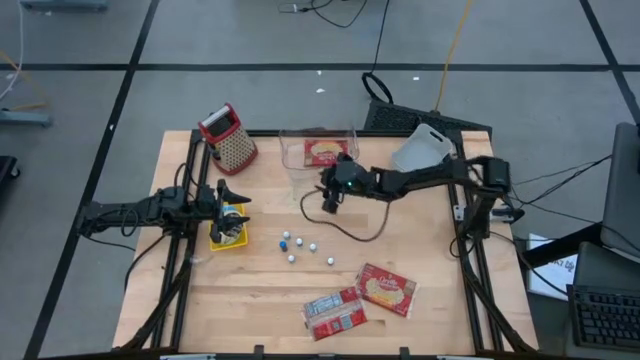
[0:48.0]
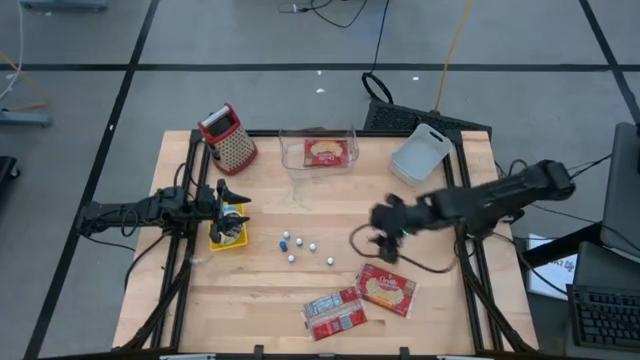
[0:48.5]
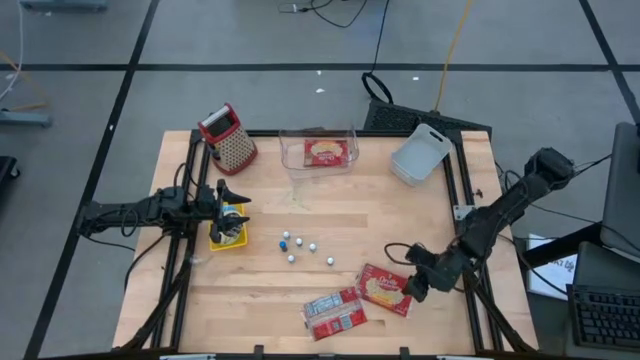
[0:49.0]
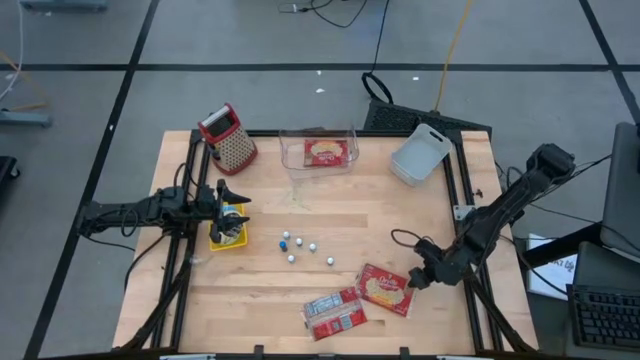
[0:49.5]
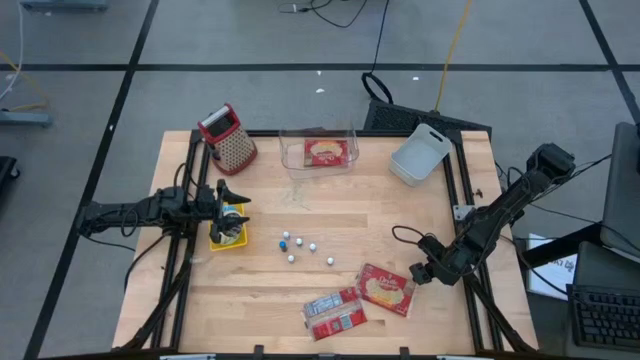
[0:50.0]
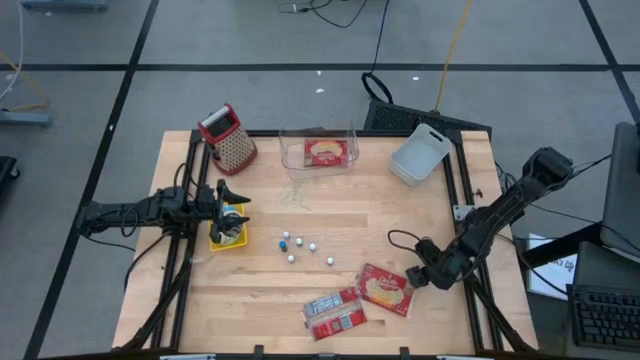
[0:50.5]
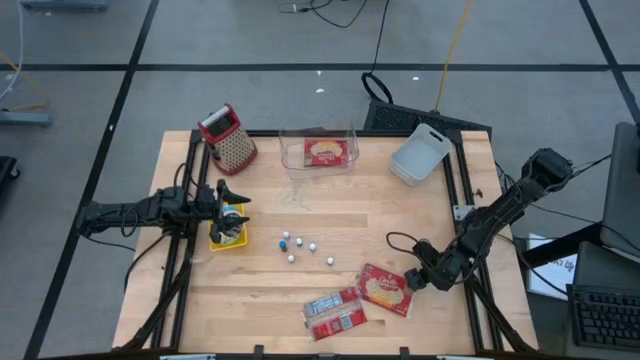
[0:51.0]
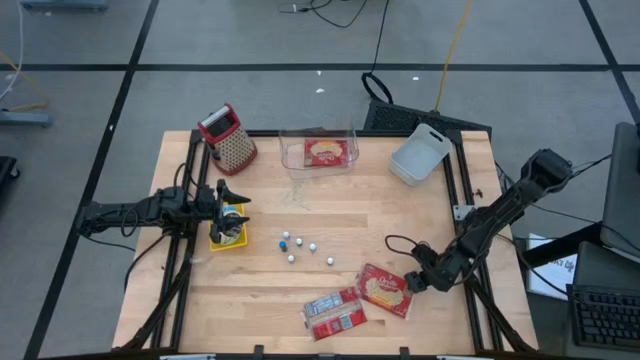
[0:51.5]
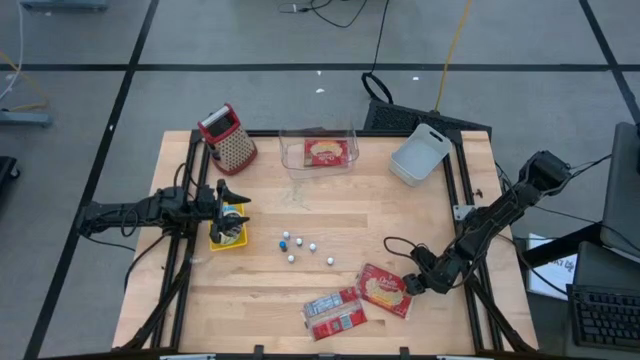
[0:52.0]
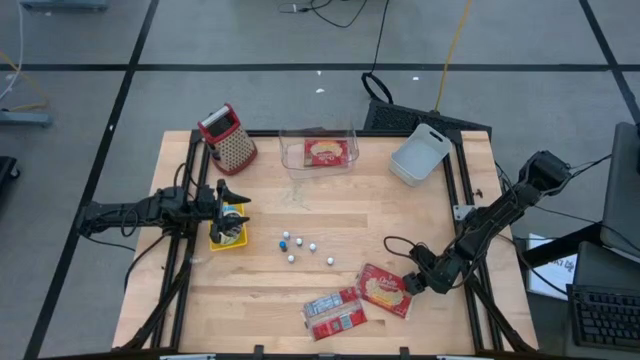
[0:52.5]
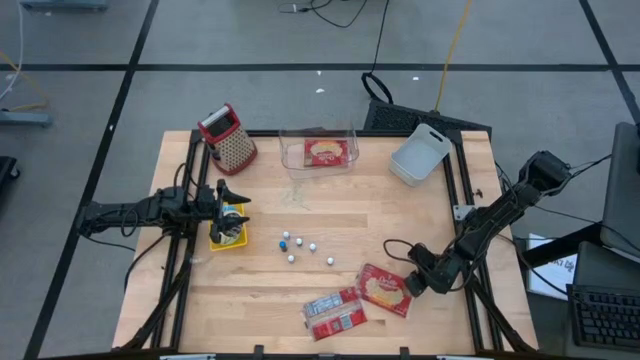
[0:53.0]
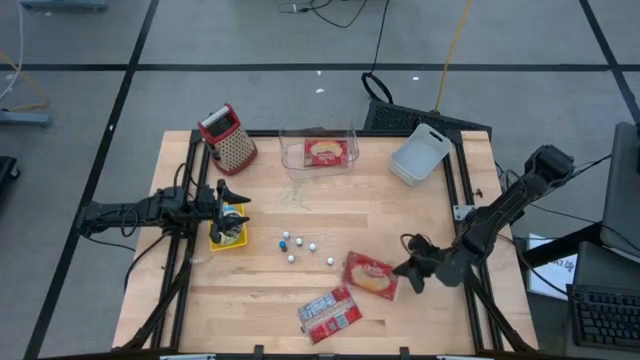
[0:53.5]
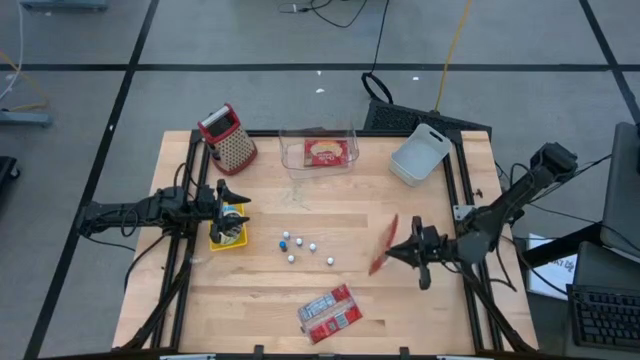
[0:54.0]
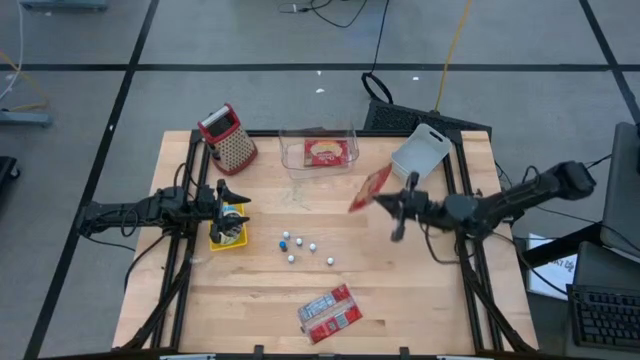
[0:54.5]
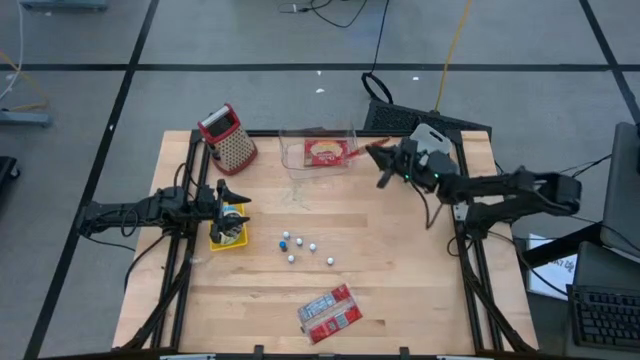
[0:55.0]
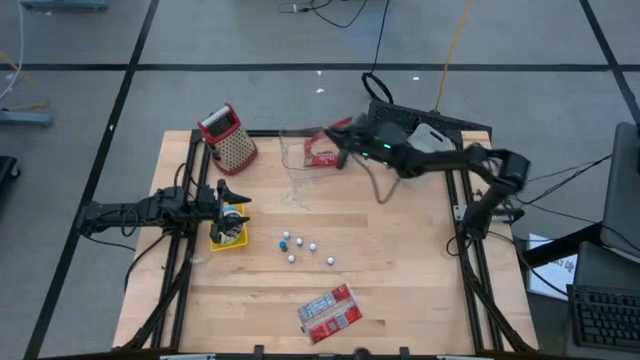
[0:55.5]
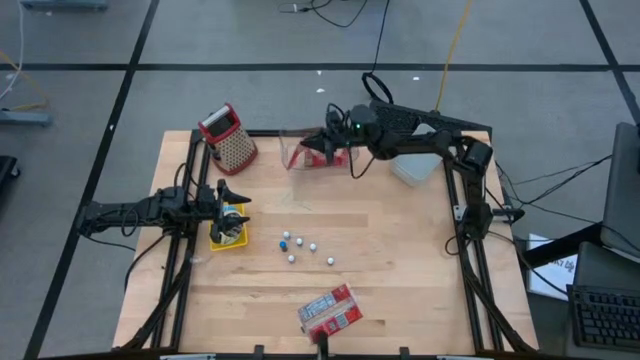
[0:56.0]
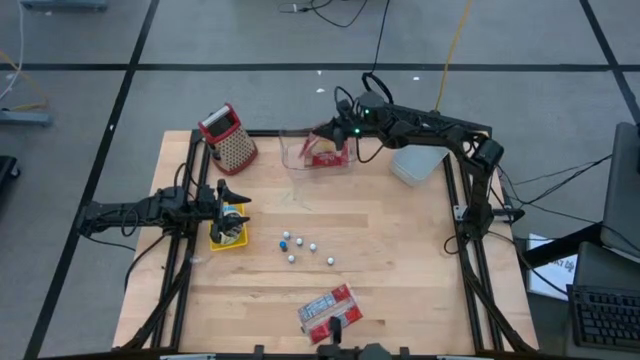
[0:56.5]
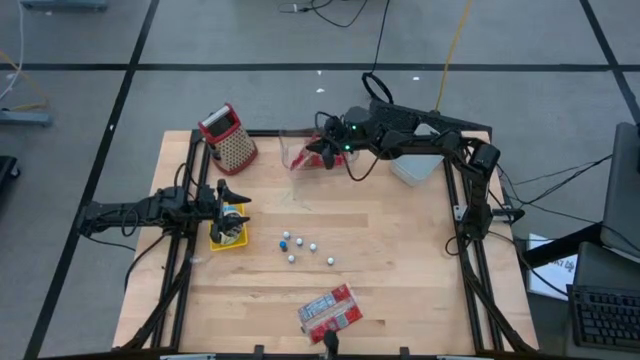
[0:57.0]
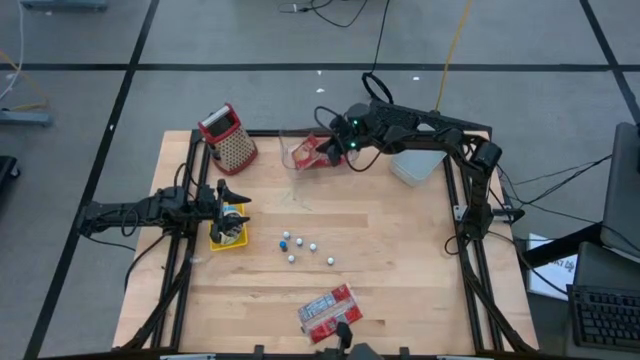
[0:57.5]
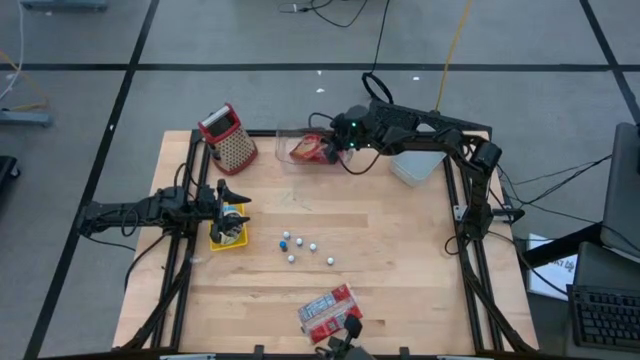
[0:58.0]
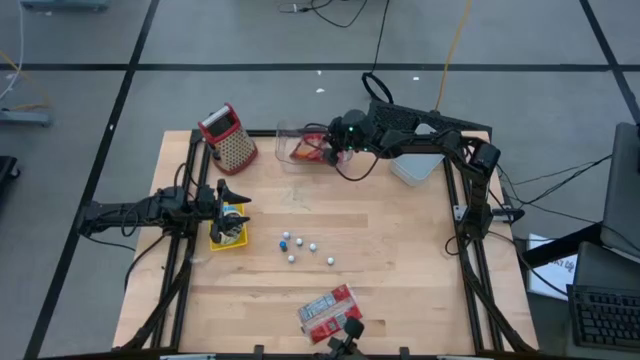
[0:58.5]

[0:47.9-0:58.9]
Put the right popcorn bag into the transparent bin

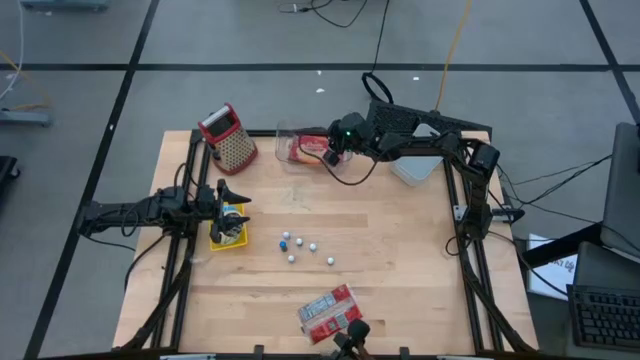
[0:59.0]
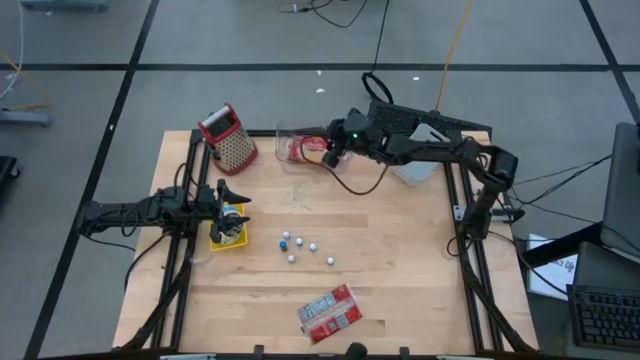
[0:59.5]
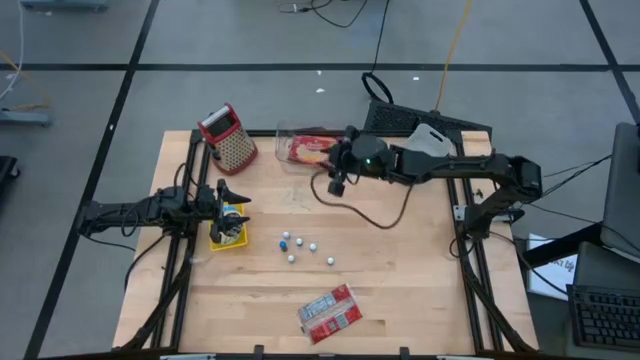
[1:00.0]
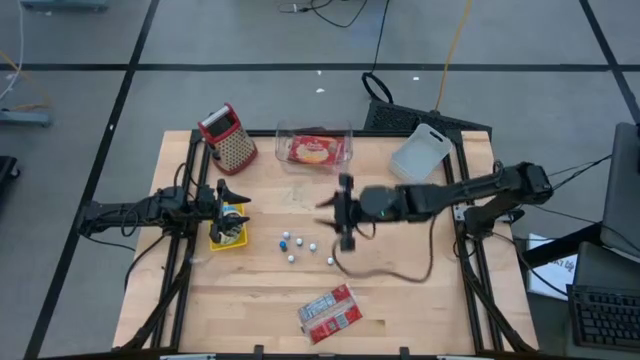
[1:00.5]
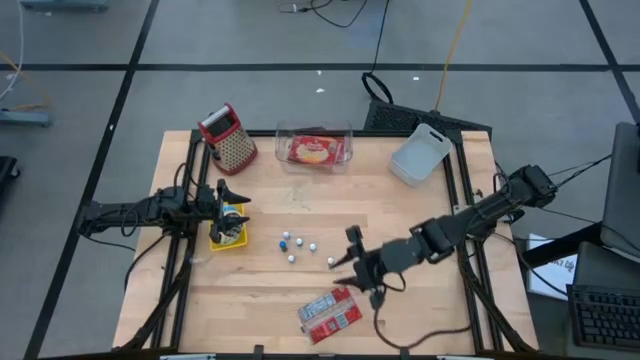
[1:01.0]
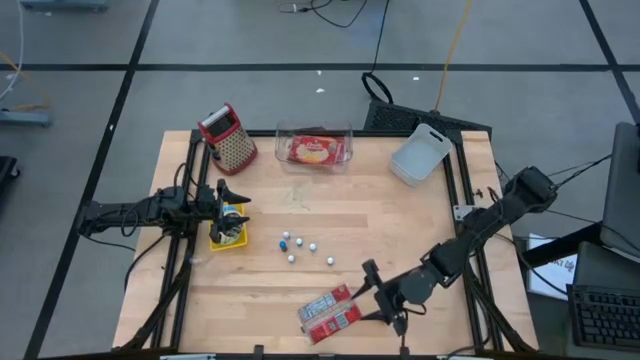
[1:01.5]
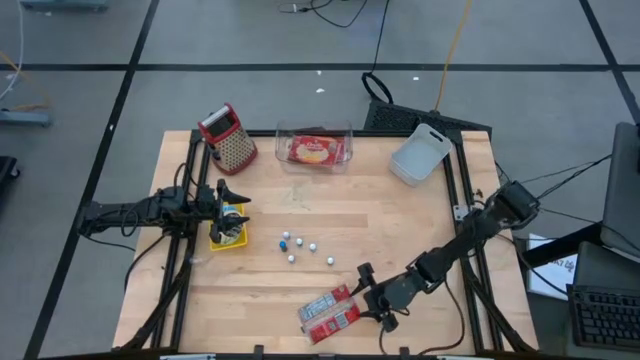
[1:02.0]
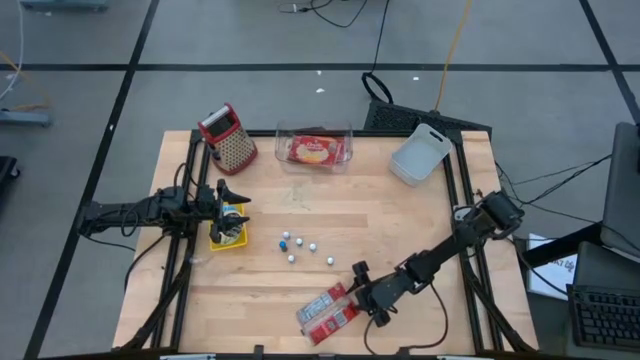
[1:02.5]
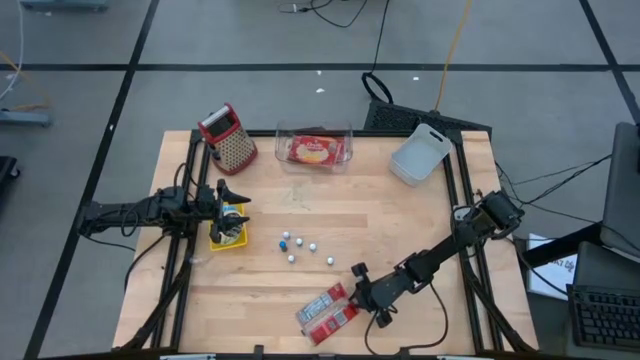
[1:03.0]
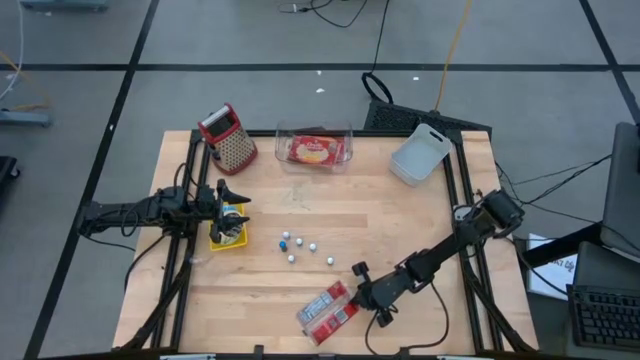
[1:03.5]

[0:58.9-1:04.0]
Put the popcorn bag into the transparent bin

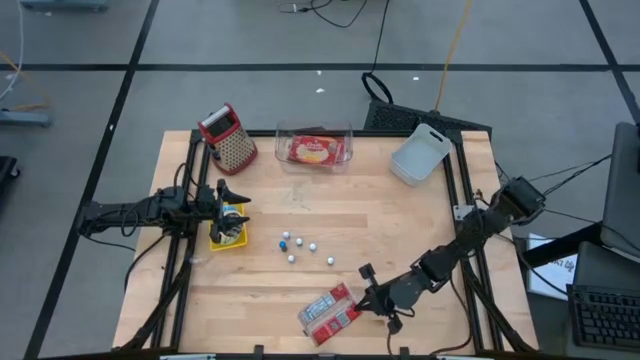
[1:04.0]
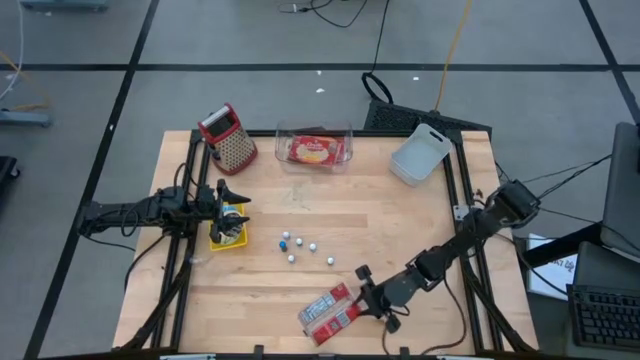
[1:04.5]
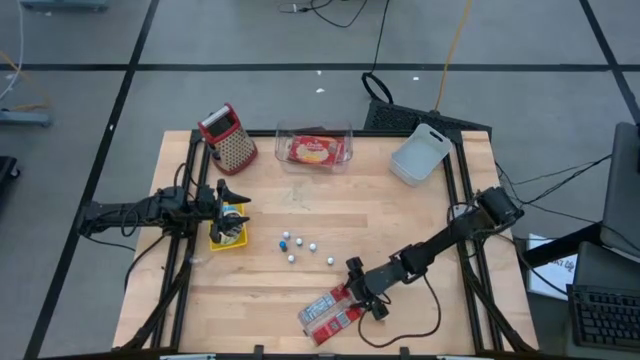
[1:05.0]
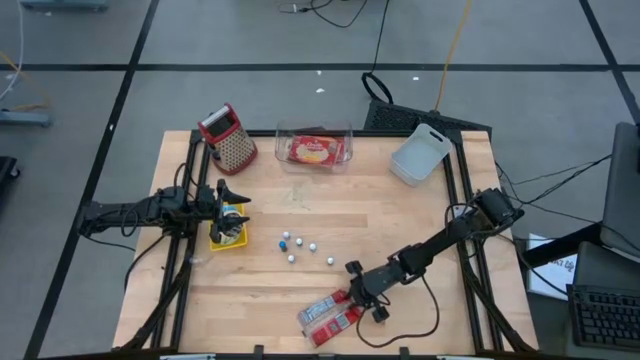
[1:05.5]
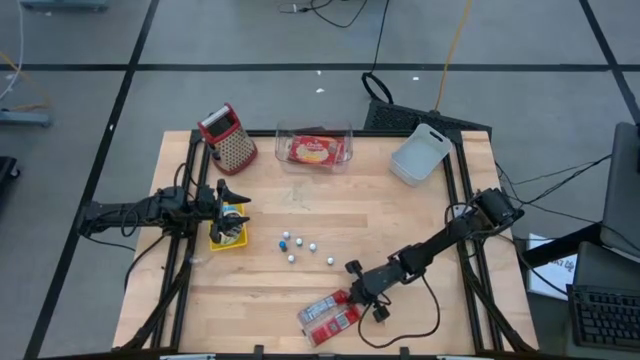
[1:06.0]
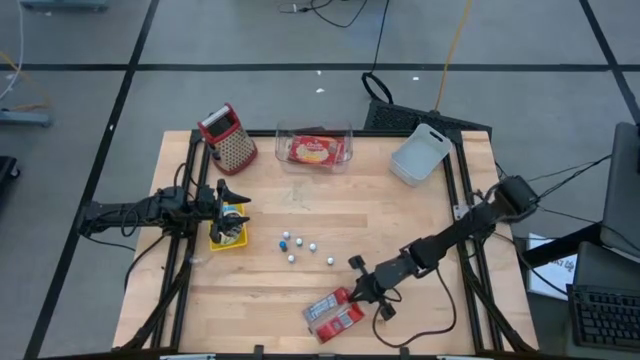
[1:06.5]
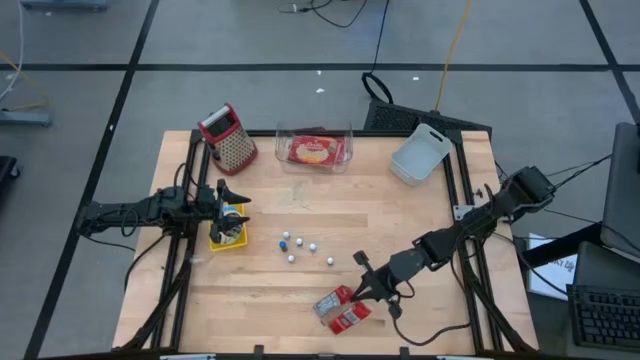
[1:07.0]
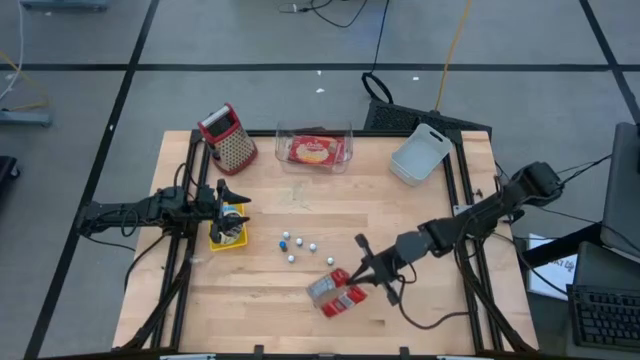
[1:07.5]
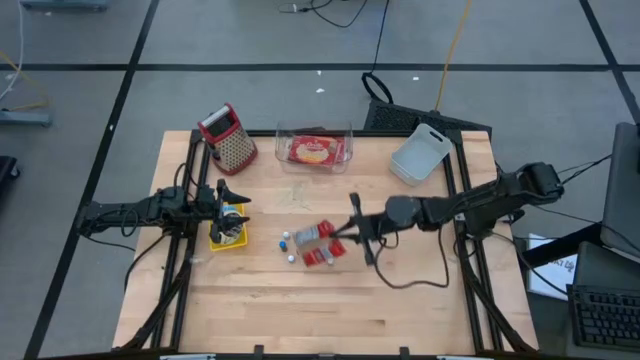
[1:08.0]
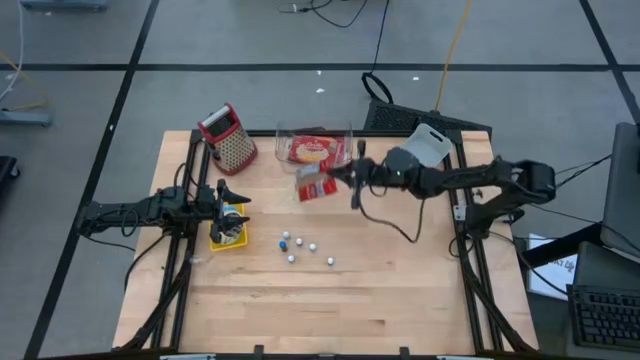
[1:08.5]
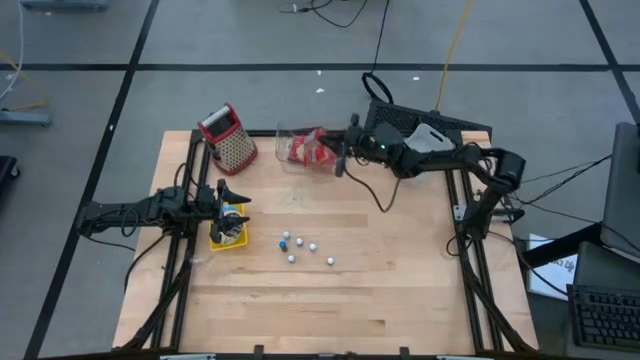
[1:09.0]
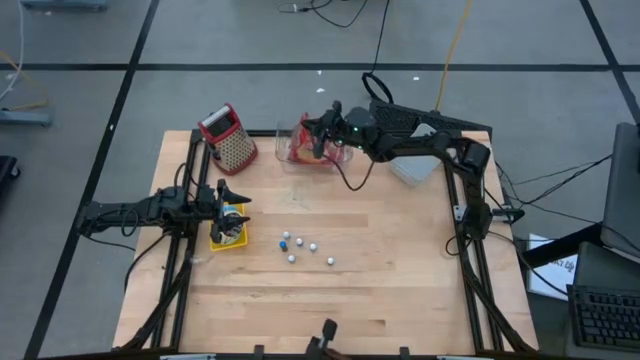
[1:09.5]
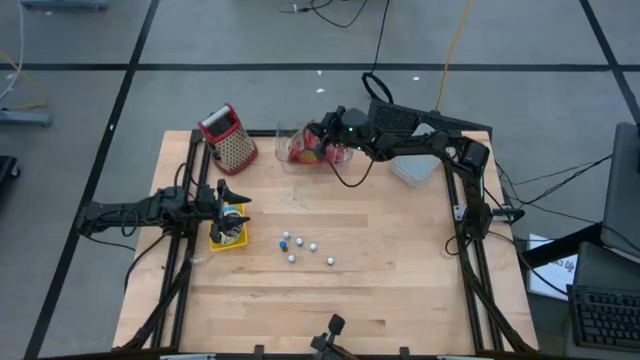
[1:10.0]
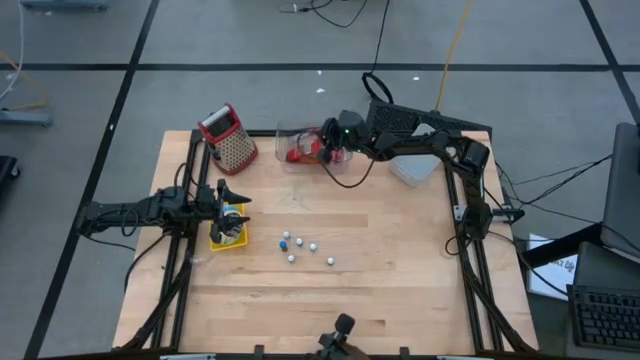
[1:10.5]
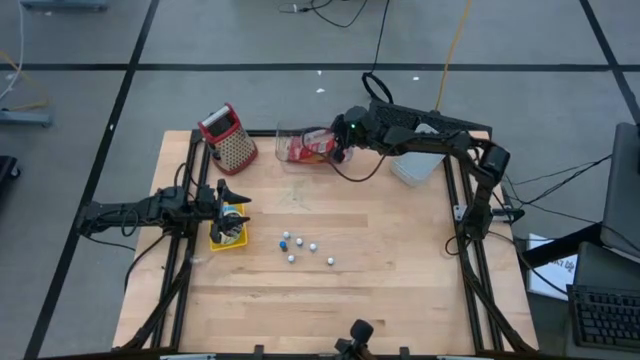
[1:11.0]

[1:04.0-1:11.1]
Put the popcorn bag into the transparent bin
